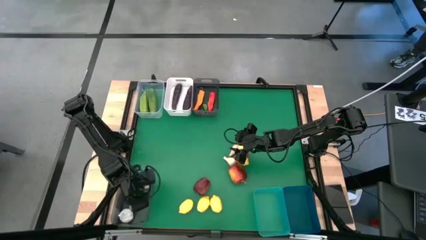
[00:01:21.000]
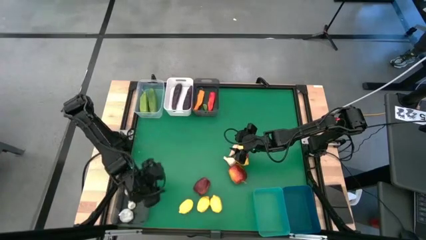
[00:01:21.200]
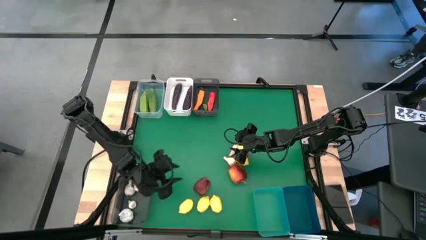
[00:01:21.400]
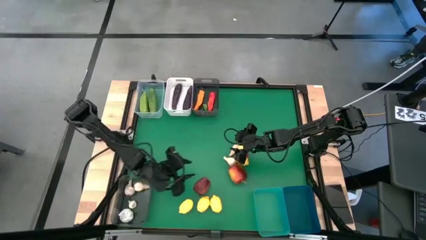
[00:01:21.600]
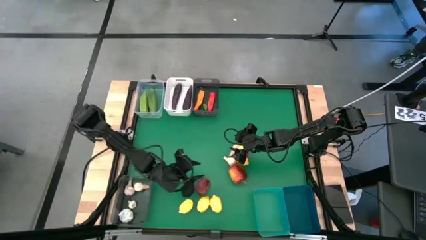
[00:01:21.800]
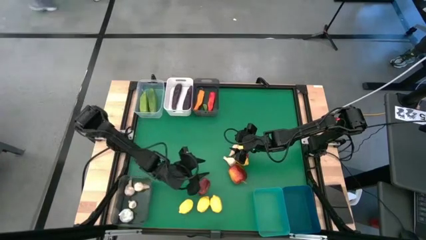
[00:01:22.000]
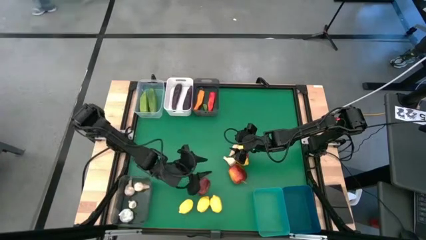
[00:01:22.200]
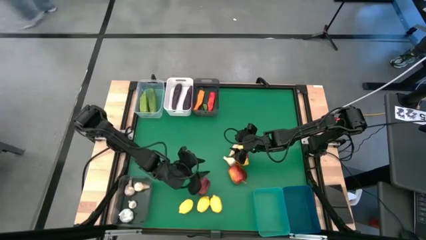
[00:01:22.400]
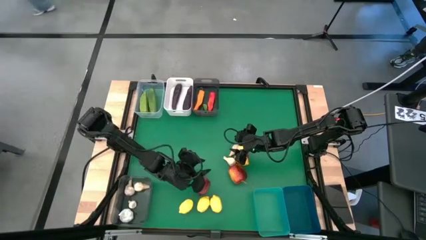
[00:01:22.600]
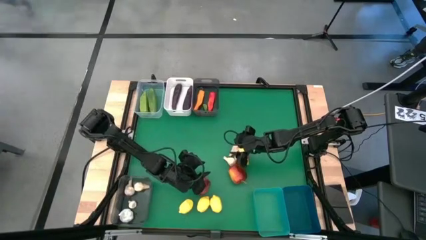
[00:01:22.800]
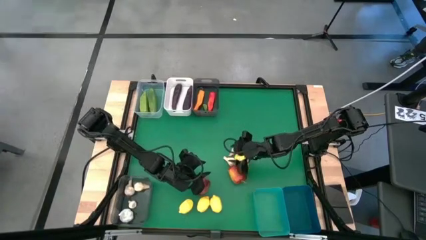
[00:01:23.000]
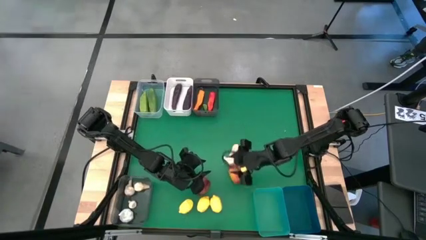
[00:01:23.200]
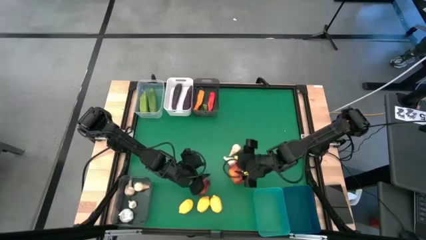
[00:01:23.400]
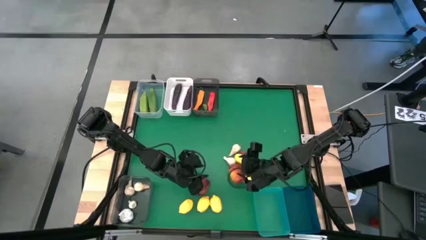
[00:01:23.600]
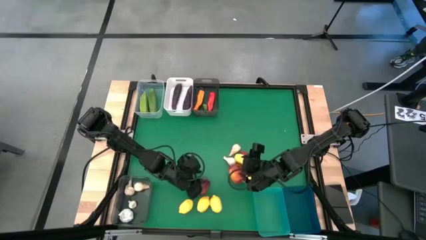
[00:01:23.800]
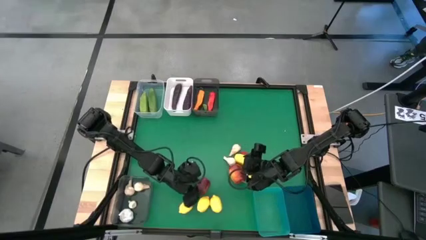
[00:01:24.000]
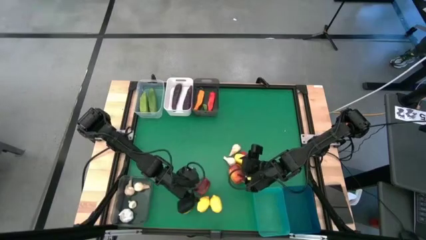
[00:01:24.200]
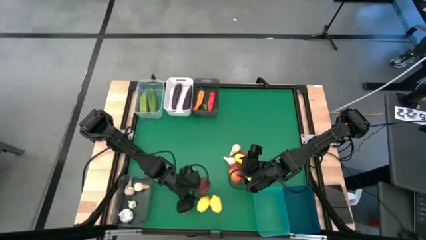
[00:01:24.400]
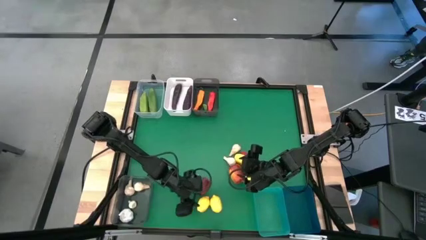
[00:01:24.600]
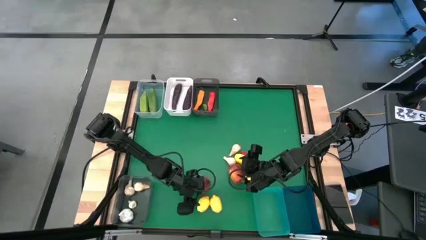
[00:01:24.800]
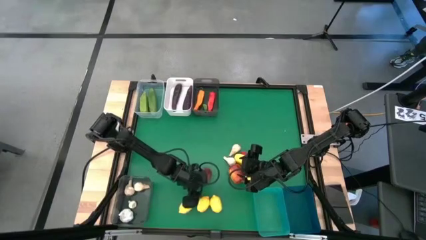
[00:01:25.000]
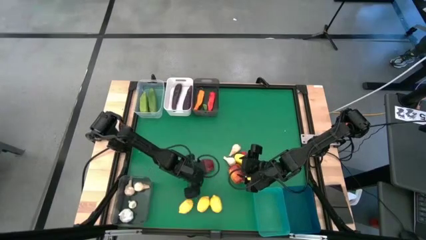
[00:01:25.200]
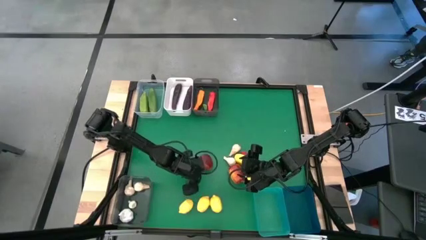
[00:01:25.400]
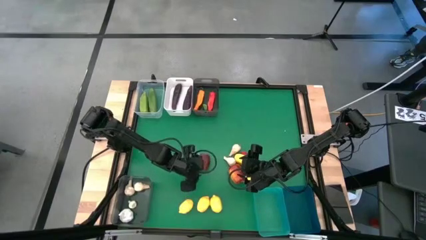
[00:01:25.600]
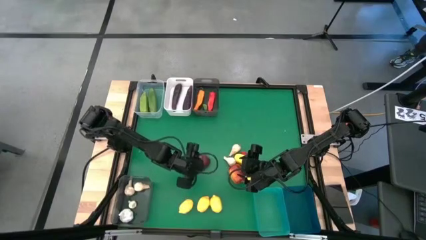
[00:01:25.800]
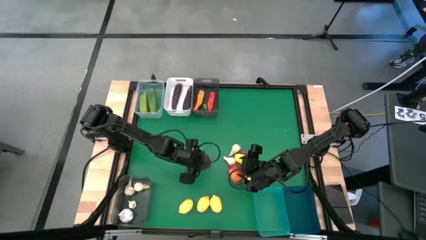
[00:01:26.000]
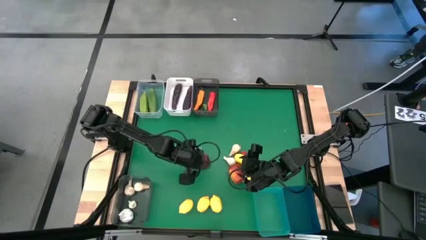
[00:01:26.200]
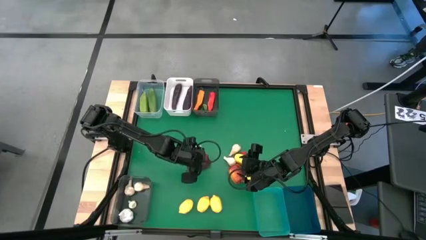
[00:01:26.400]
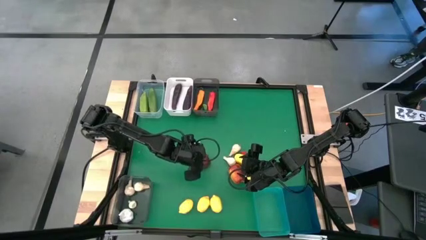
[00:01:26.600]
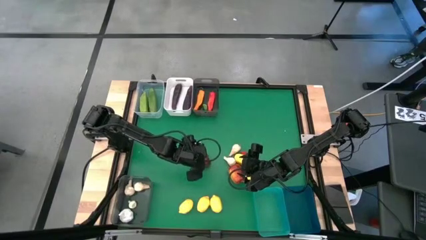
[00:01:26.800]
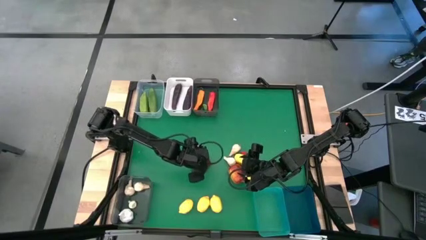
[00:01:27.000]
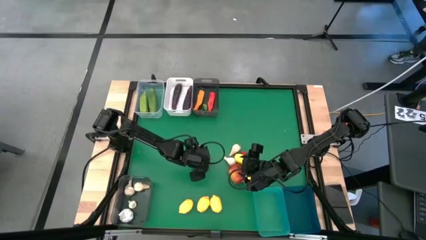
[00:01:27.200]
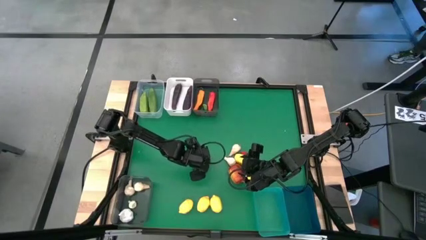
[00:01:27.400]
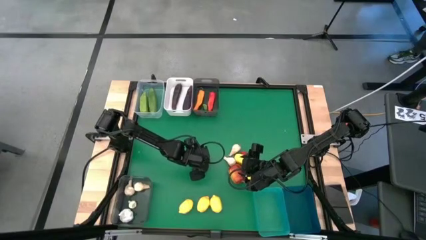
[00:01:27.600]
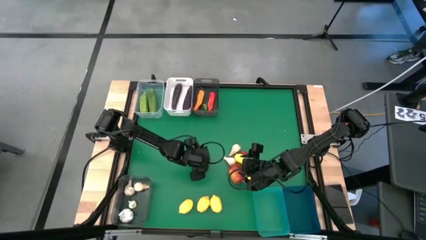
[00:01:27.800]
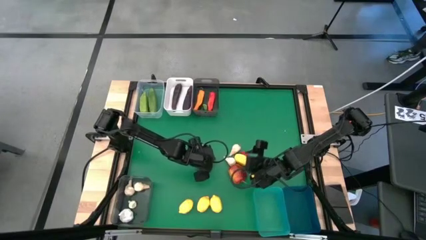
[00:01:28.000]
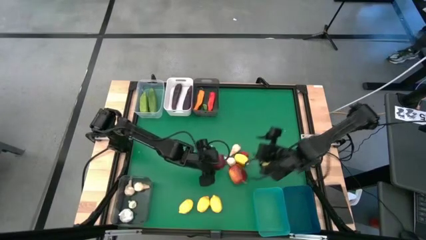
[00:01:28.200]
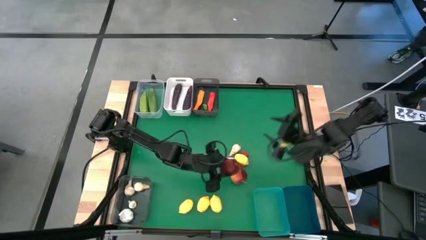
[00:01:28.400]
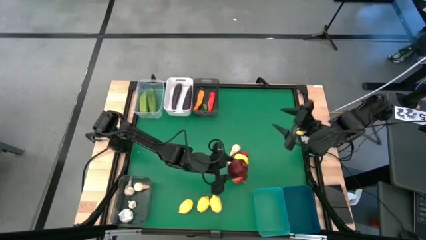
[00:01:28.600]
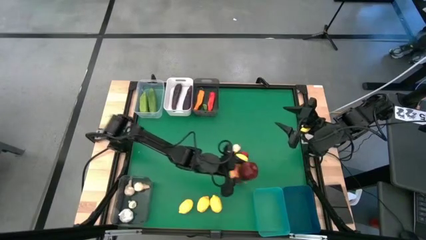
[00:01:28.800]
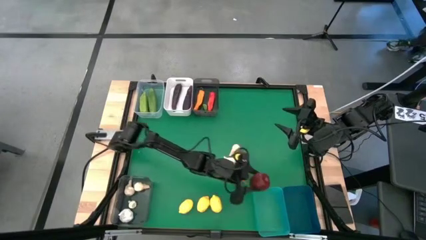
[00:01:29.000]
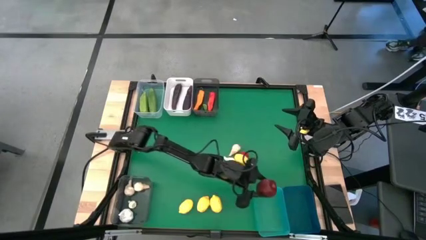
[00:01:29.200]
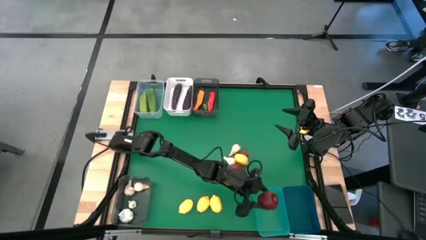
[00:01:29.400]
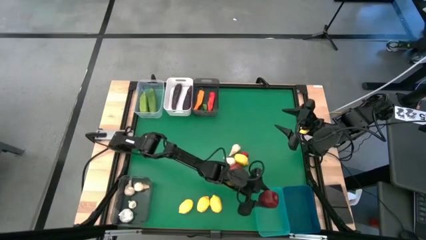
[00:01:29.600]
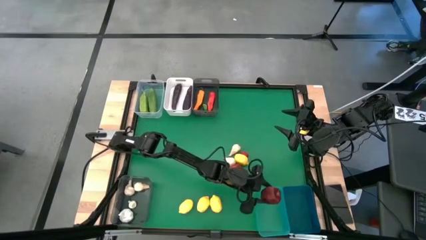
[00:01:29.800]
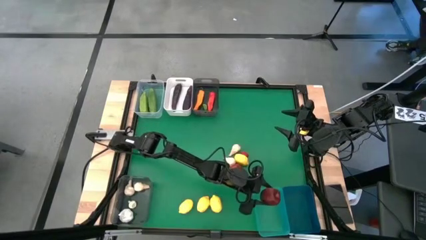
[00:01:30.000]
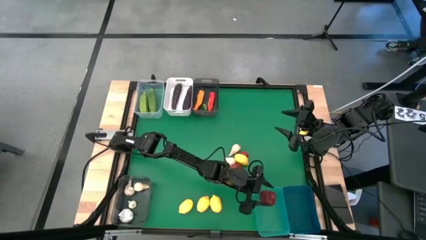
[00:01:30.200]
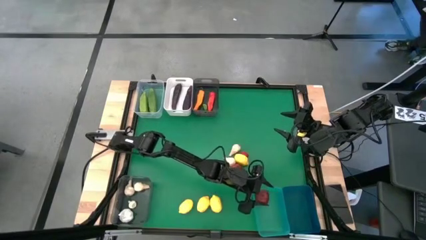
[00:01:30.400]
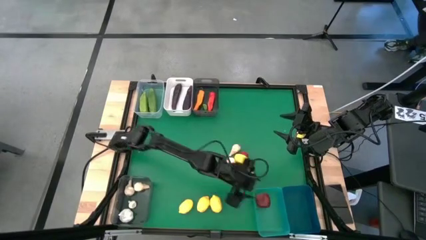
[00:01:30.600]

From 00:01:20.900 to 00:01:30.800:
Task: Sort produce into baskets
Put the red apple into the green bin

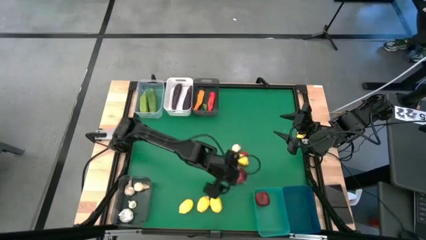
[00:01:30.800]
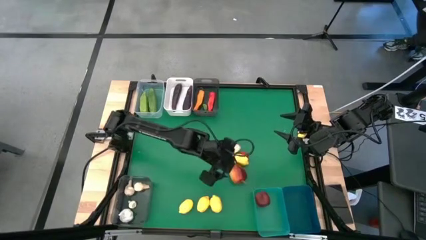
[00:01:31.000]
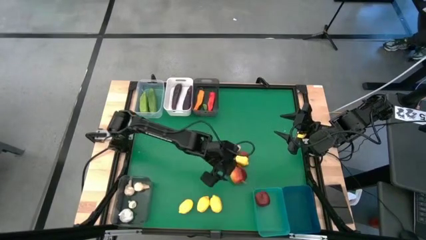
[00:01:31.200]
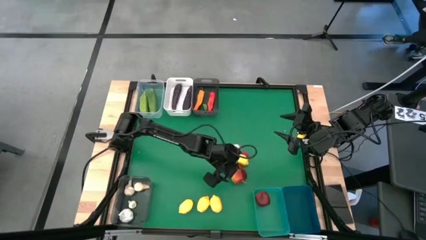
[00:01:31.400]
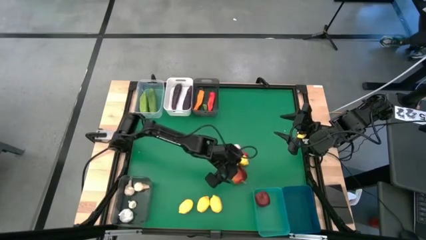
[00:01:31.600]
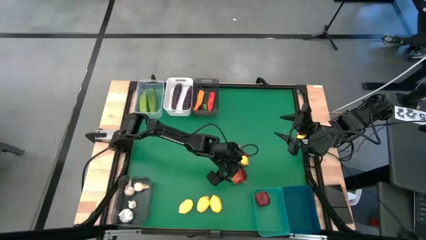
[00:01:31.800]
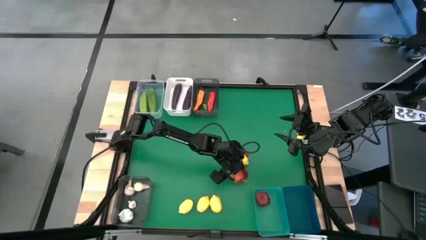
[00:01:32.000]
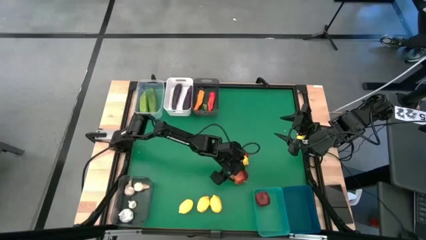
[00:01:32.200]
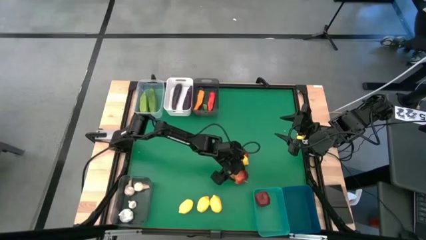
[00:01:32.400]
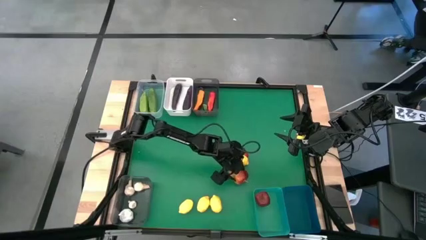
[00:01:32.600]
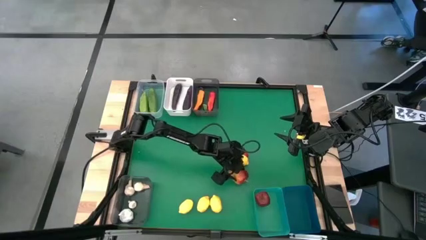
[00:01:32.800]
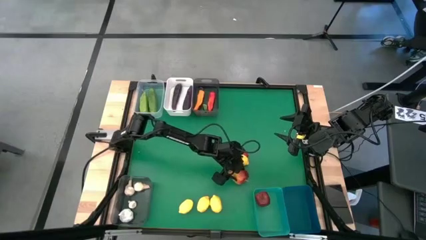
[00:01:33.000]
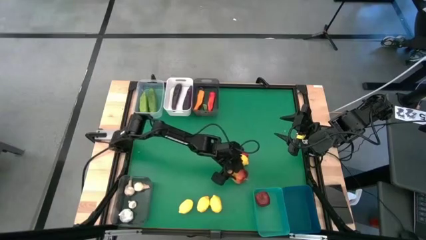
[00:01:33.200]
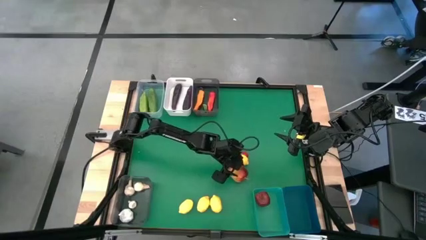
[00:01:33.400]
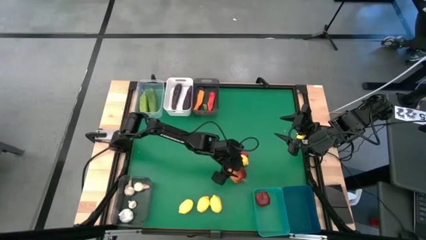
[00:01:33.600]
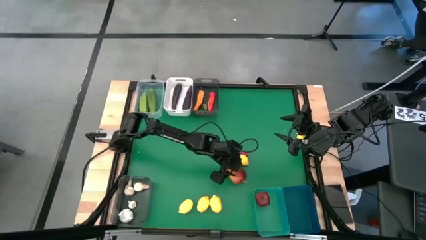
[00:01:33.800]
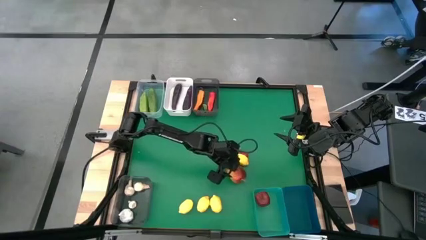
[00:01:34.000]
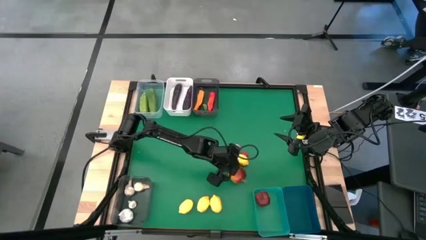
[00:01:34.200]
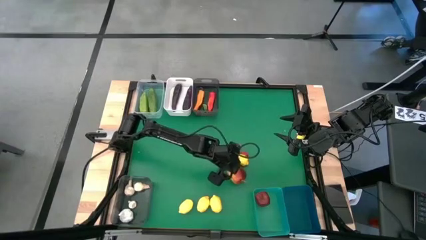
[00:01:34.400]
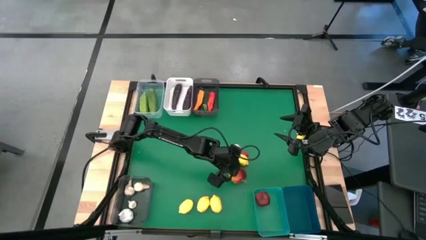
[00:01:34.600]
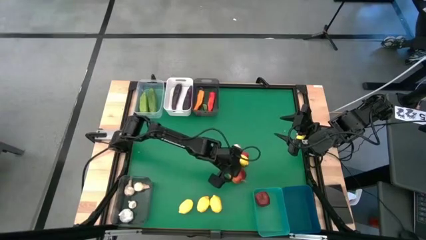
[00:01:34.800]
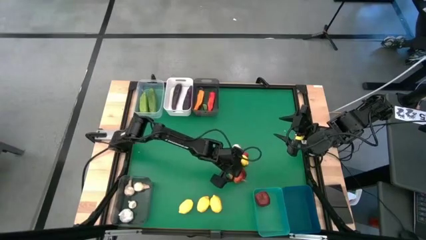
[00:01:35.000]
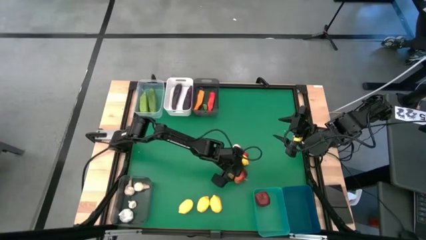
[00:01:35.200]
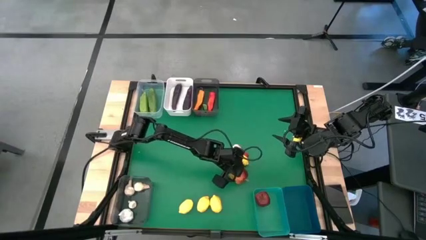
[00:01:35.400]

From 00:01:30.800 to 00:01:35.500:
Put the red apple into the green bin
